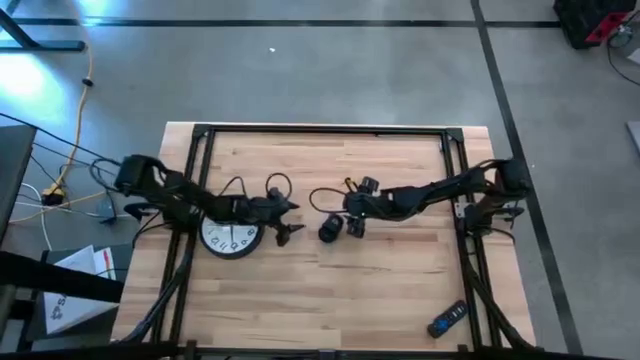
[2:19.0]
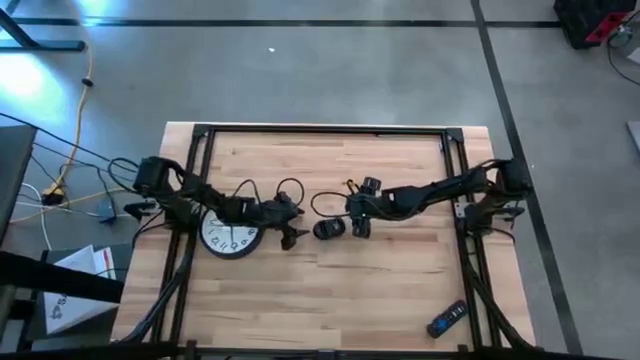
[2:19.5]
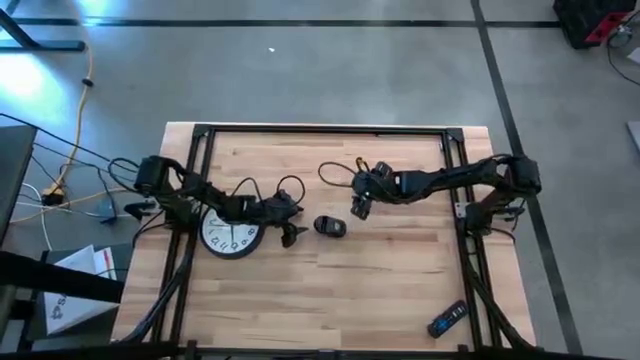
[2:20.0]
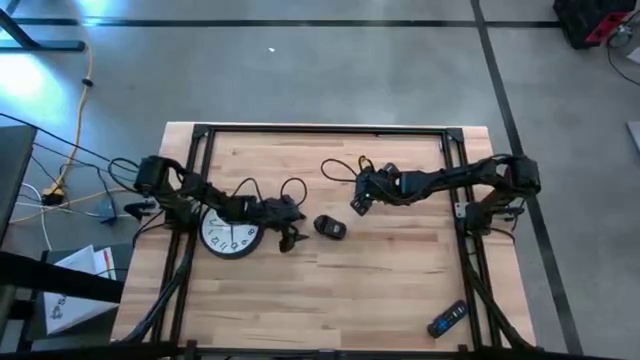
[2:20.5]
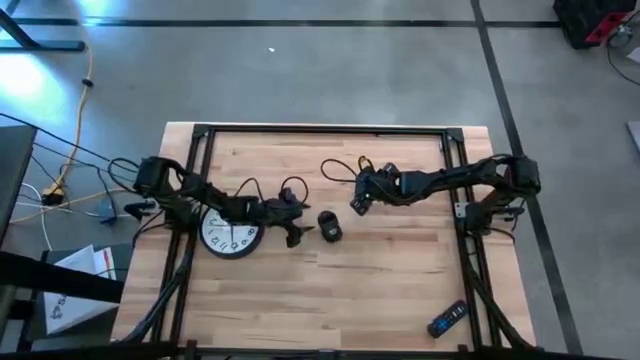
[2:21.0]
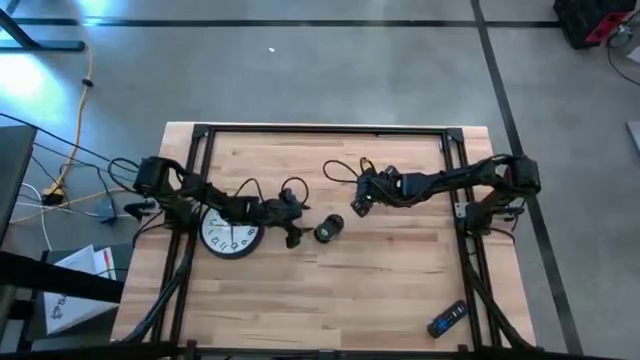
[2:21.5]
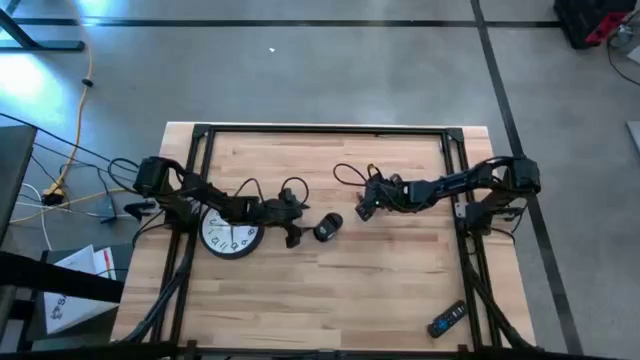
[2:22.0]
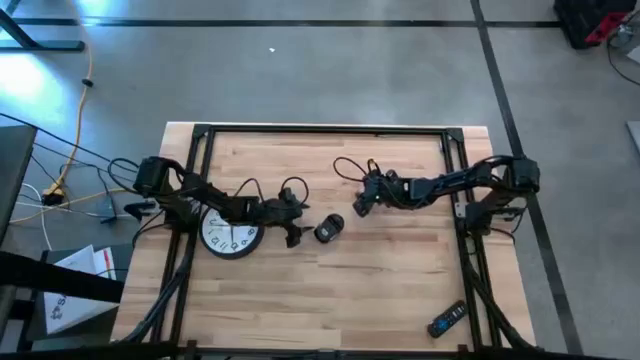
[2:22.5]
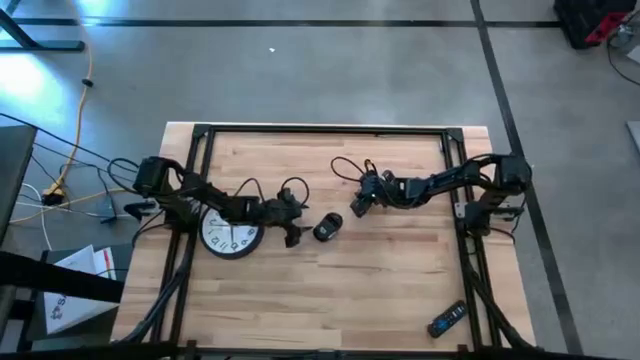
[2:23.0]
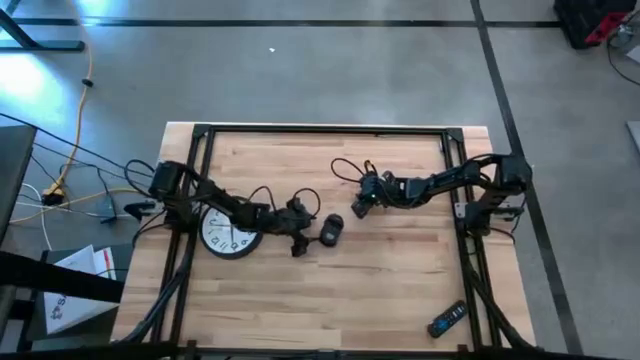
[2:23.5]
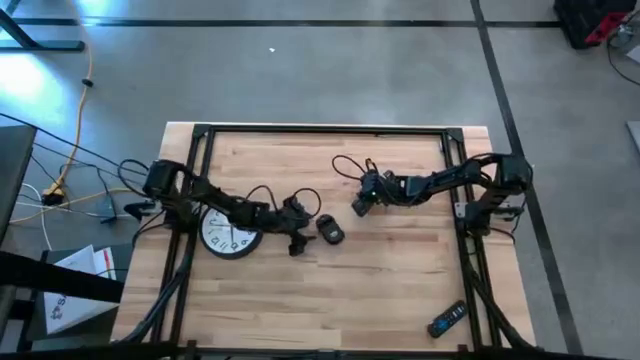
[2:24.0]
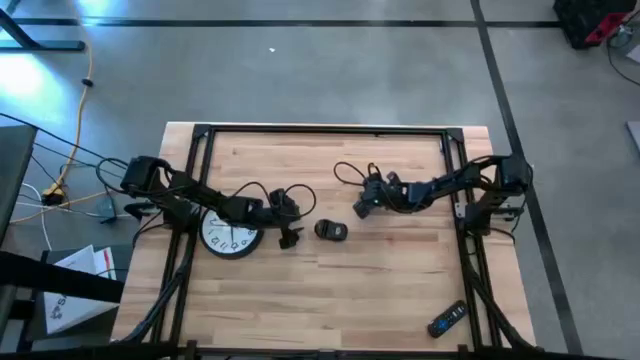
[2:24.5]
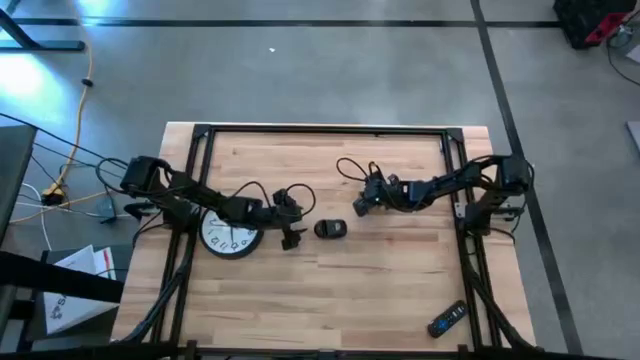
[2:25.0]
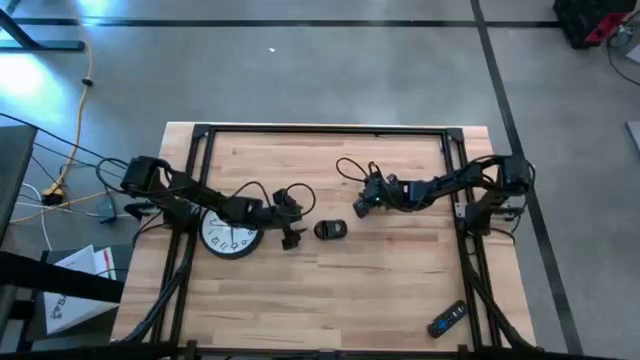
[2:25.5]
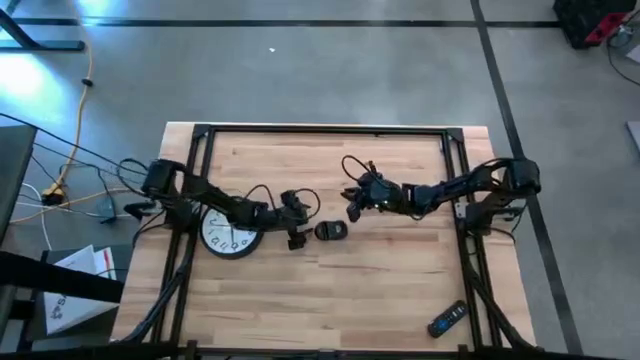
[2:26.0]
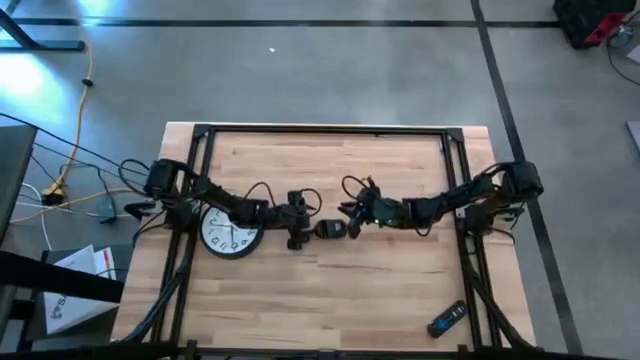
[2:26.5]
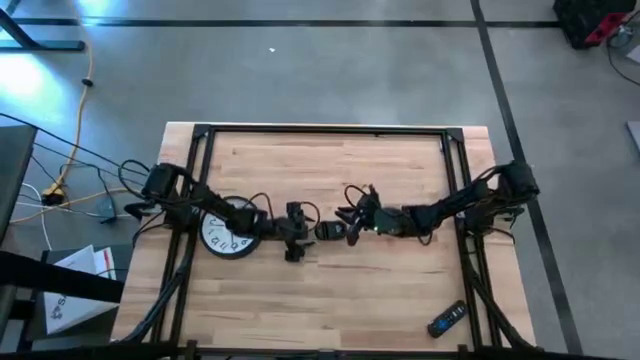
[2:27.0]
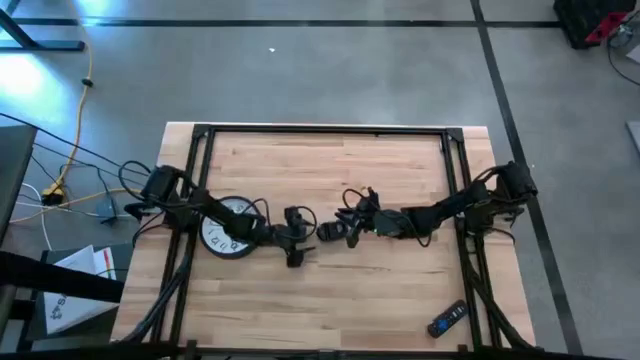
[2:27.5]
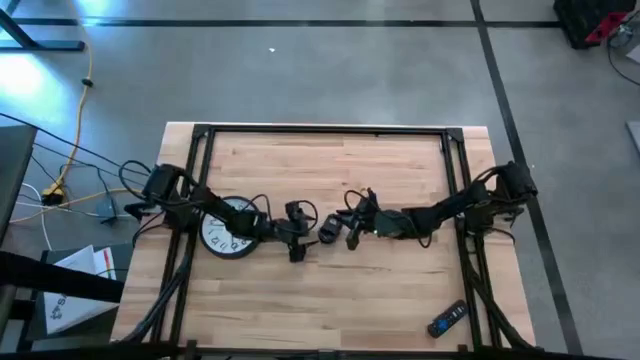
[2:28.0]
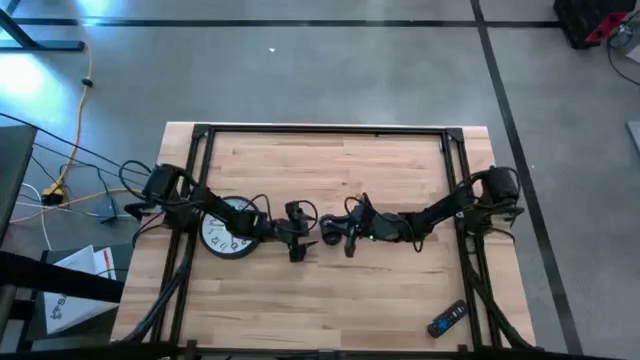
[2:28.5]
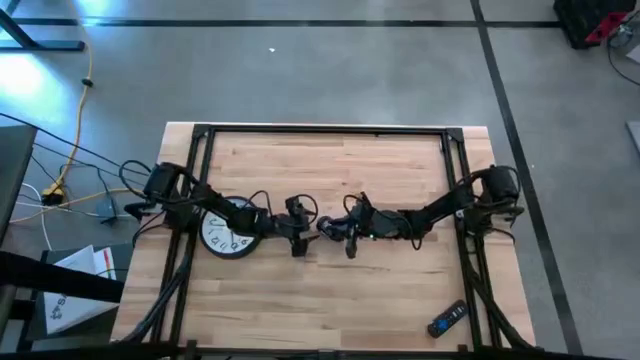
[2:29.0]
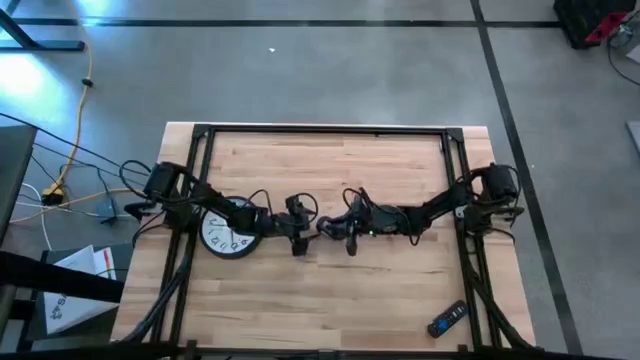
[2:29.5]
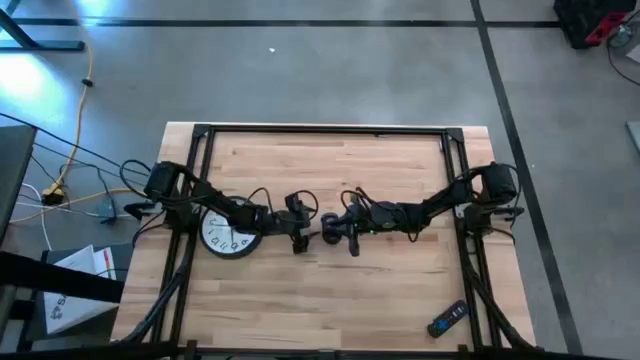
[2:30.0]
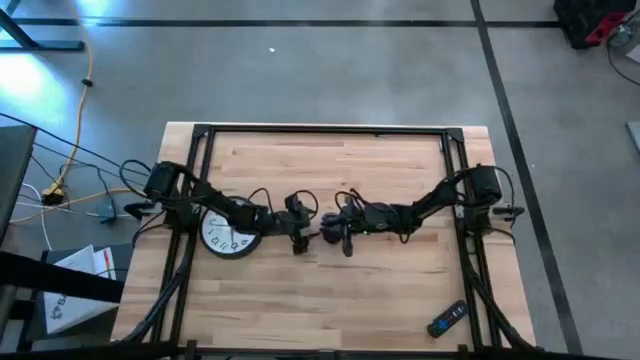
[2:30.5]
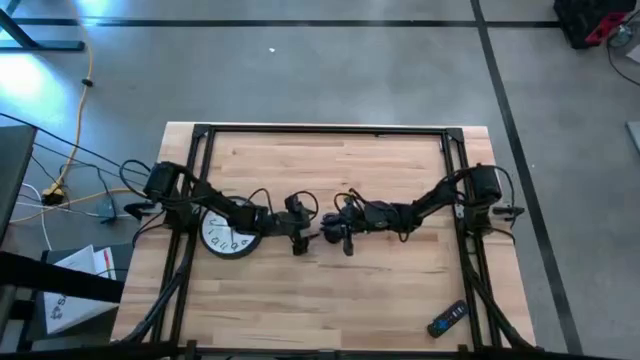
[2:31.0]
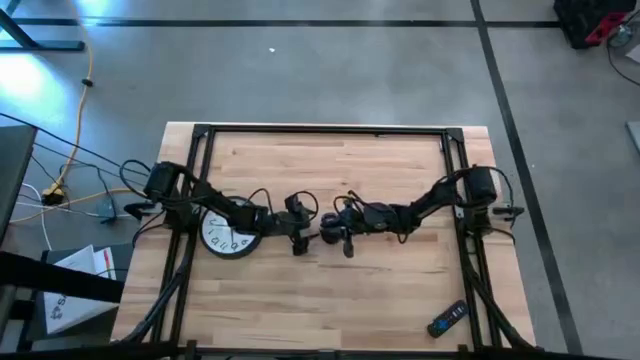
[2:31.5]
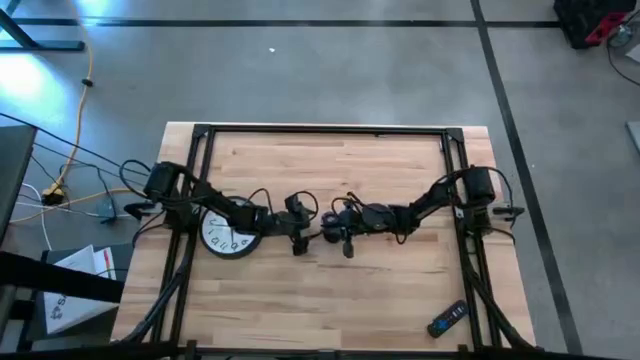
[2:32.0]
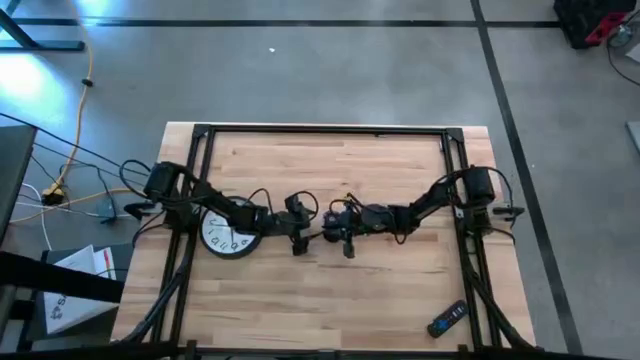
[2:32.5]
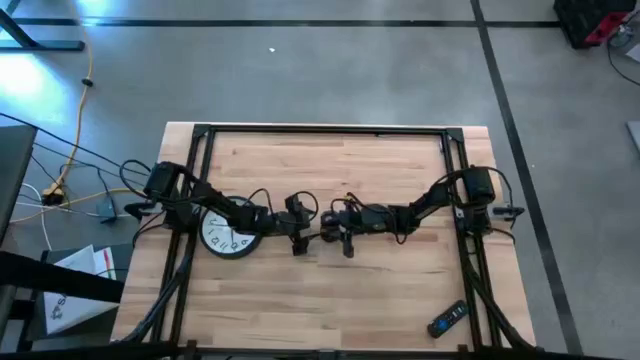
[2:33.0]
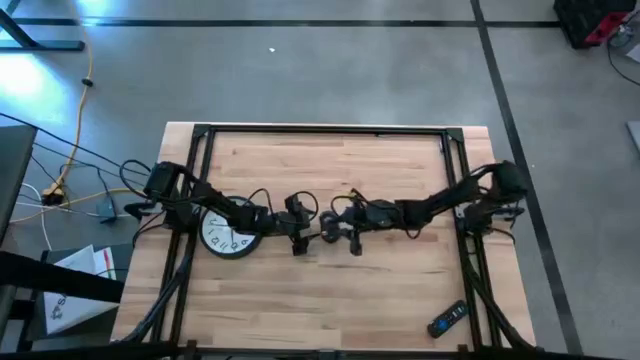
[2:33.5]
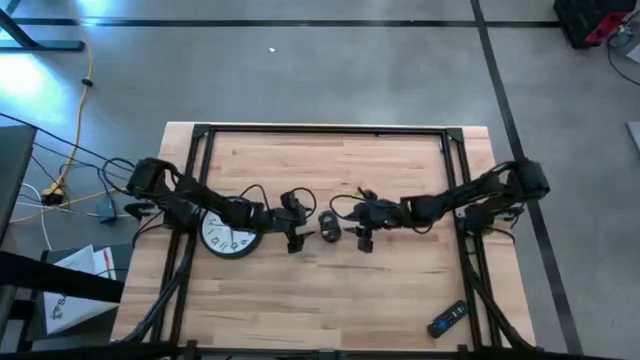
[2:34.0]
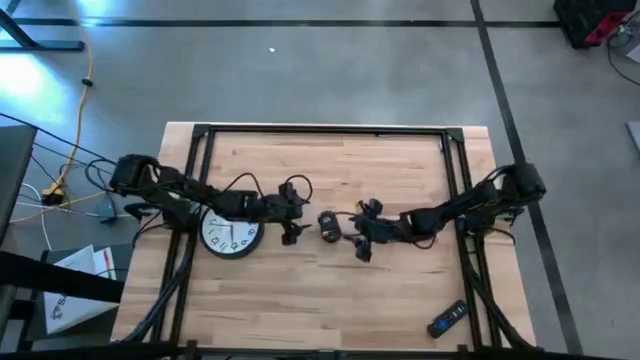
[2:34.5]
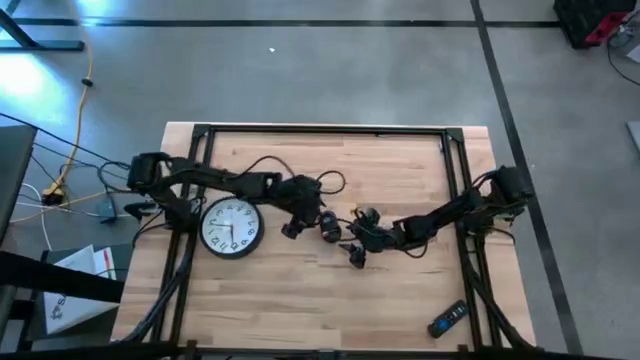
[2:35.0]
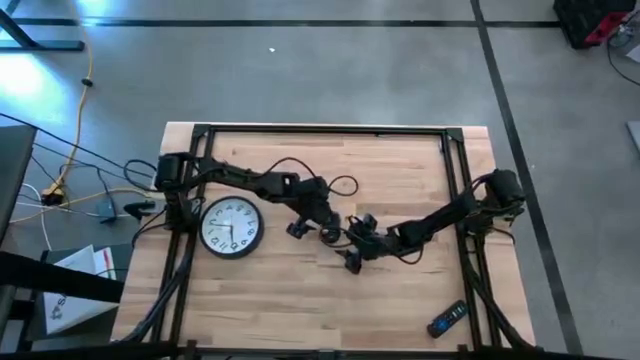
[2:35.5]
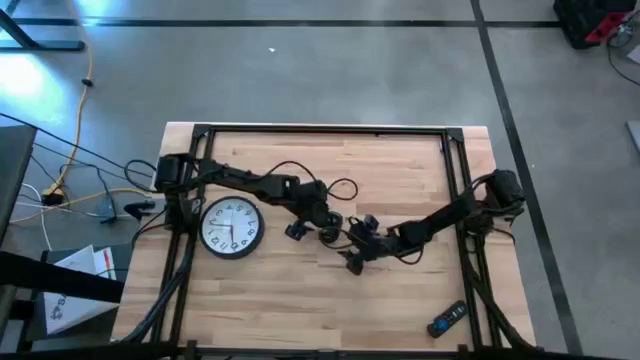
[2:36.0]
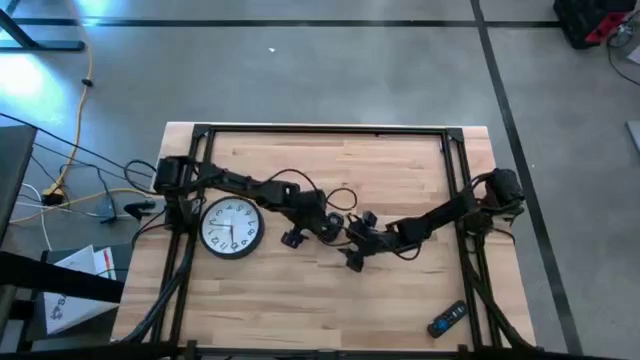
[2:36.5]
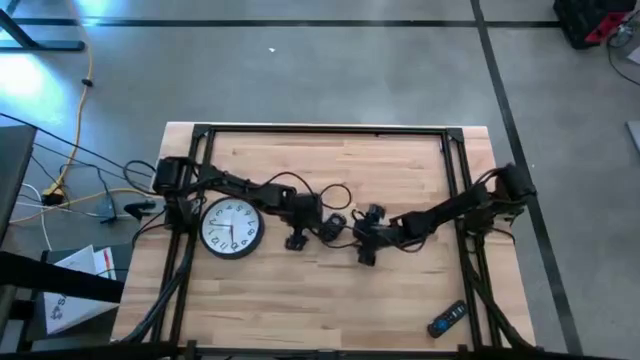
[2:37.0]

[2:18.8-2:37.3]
Task: Insert battery
Insert the black battery into the black computer mouse

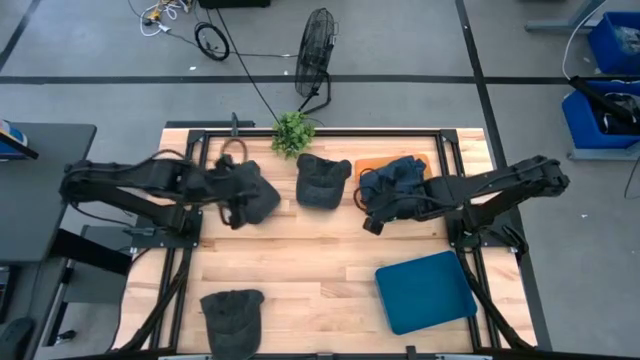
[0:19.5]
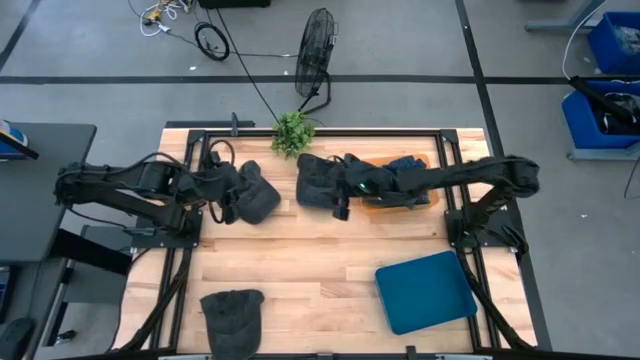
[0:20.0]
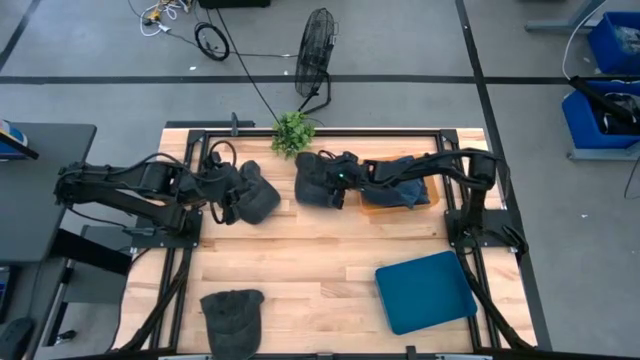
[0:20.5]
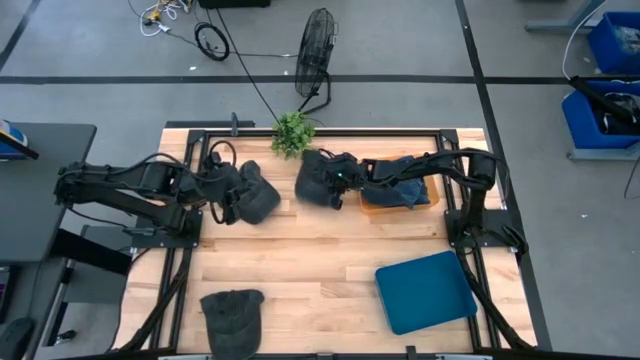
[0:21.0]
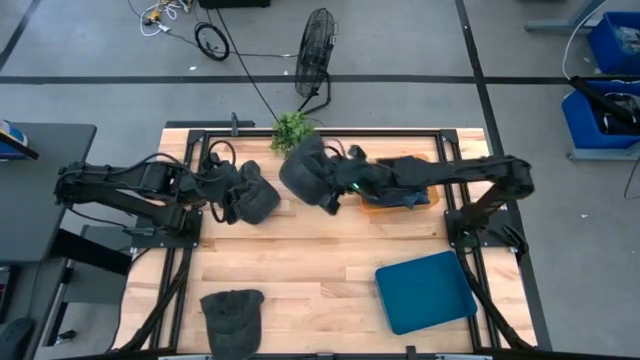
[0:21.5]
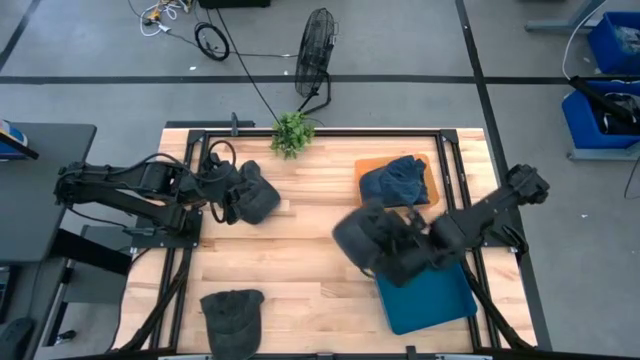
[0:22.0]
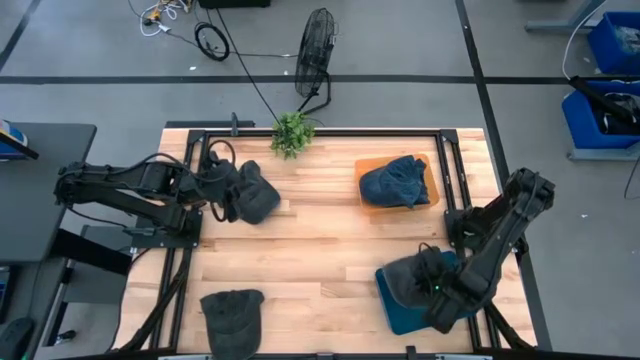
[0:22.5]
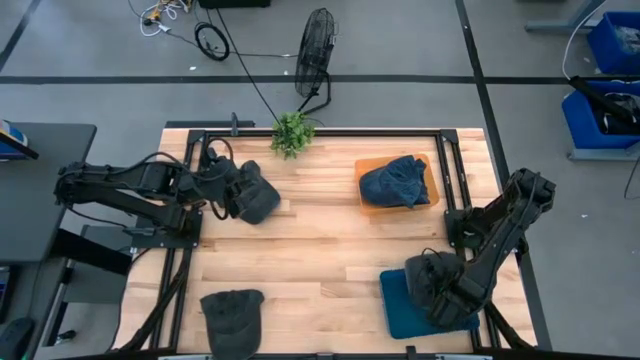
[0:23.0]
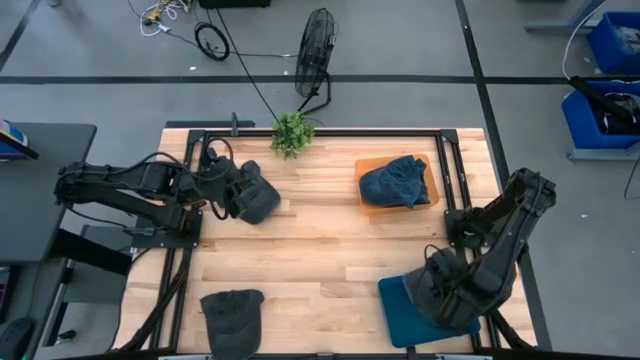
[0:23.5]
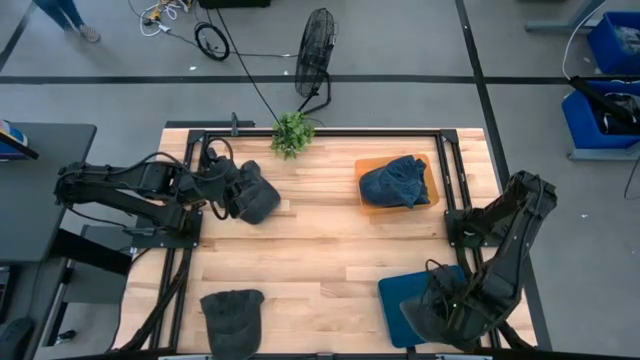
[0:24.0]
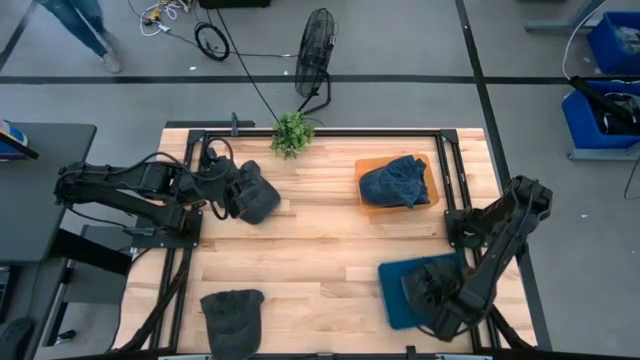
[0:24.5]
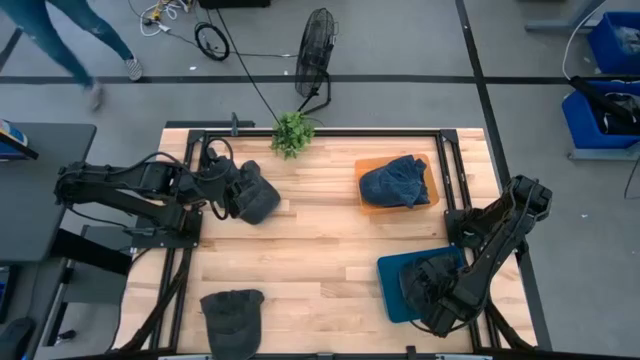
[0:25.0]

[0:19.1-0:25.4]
Task: Pick & Place hat
Put the top right black cap into the blue bin
